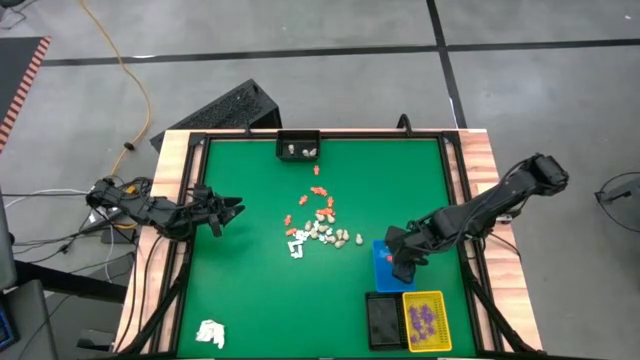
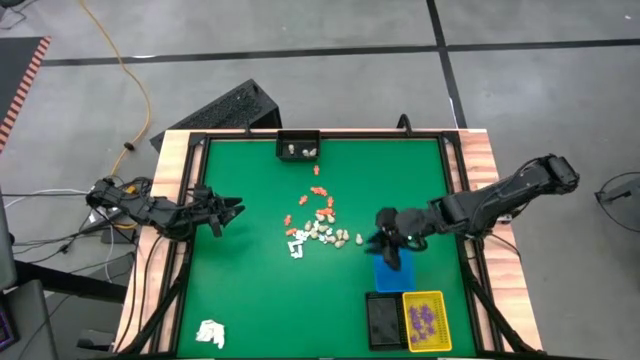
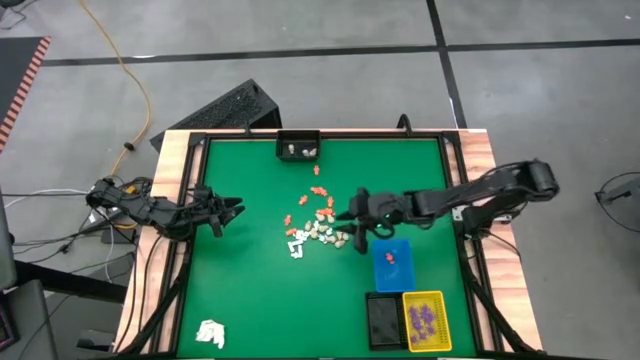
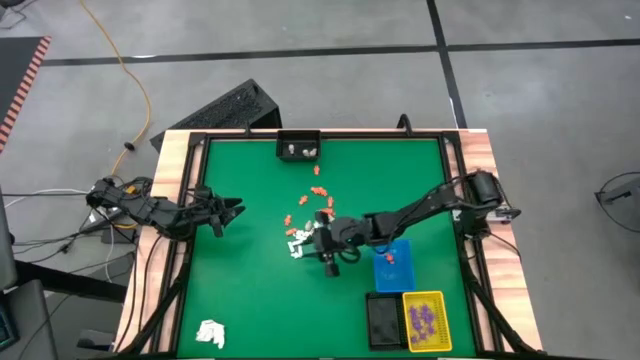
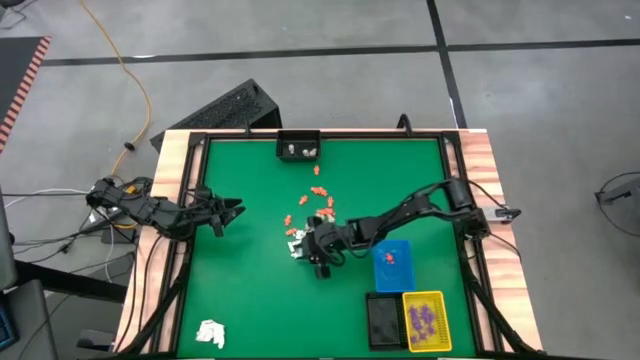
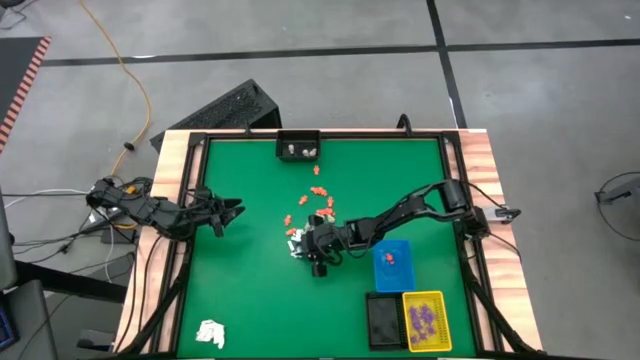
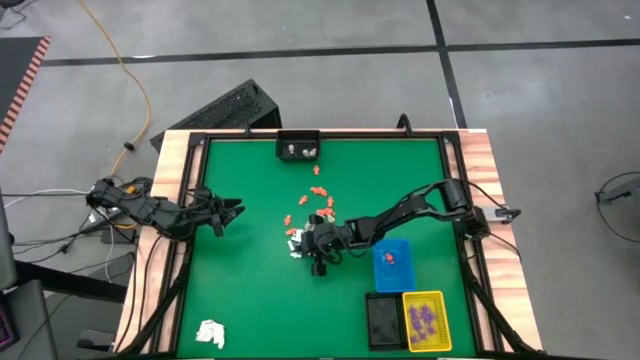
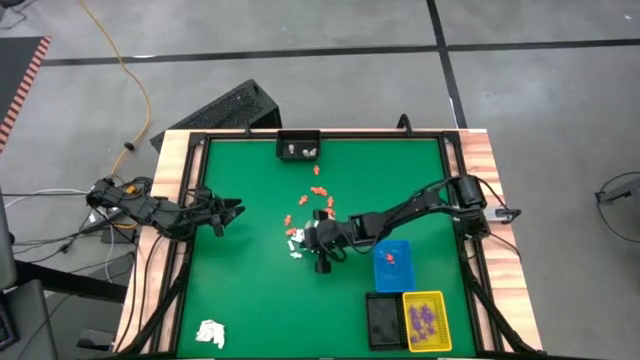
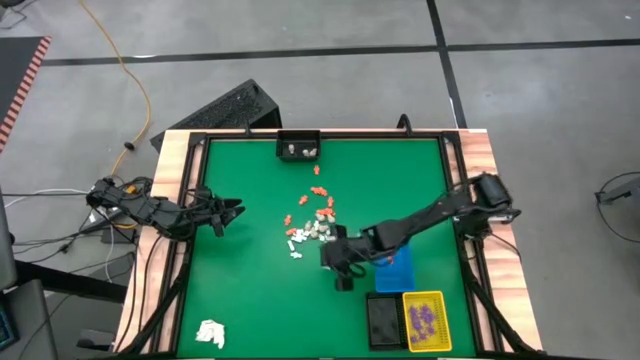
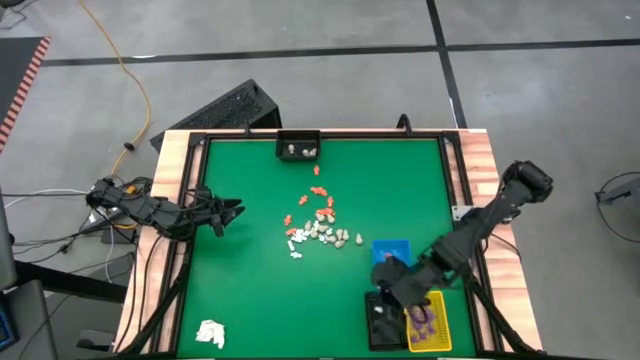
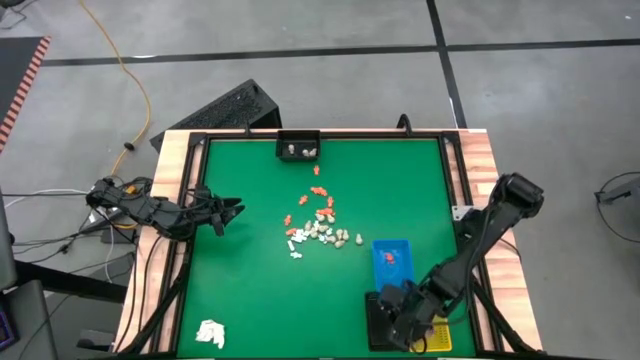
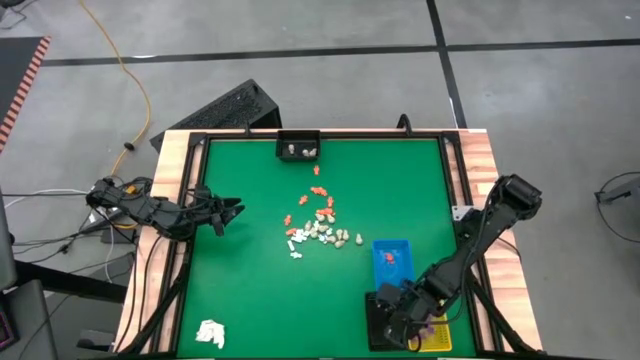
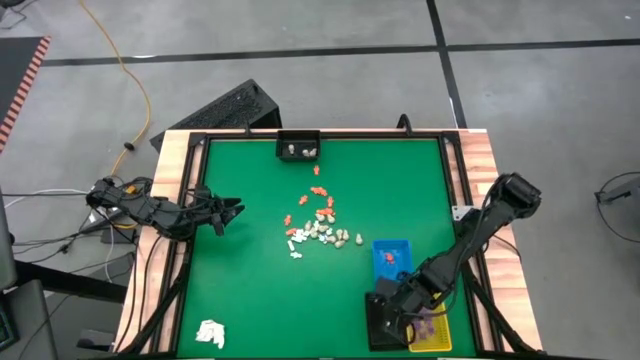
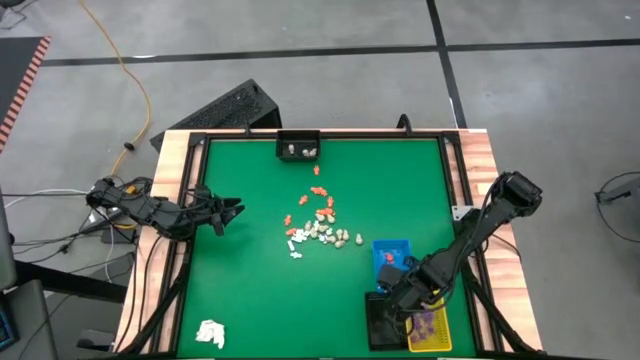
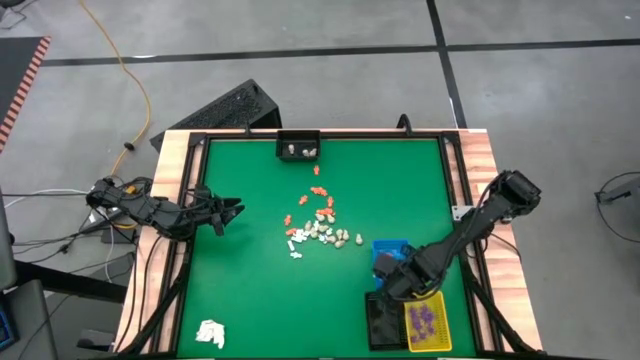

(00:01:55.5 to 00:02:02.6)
Task: Sort Halloween decoration
Put the white skeleton toy into the bottom black bin

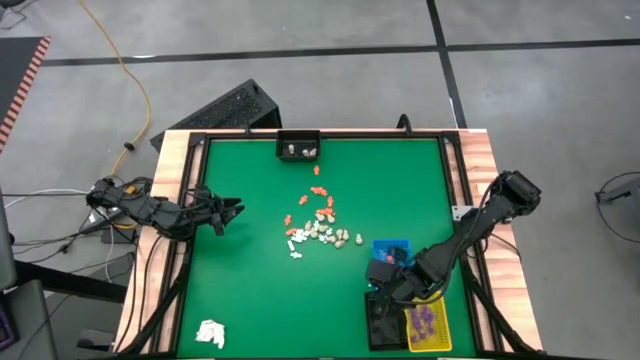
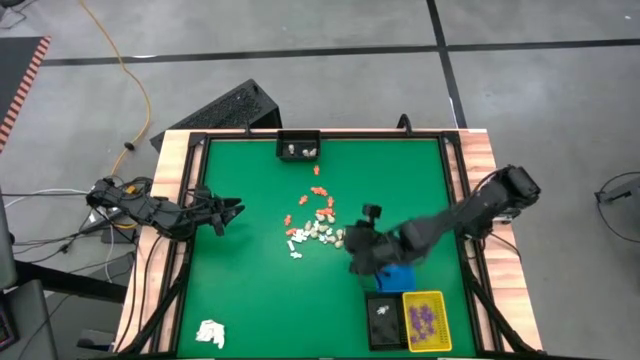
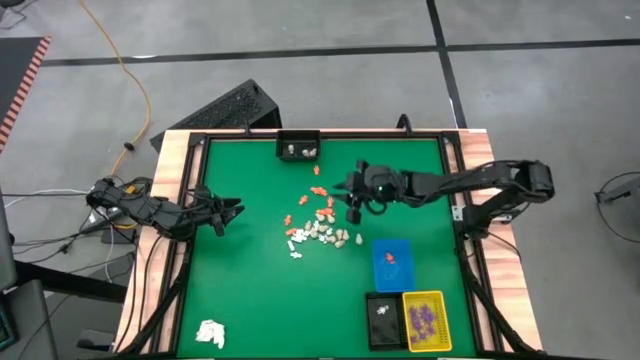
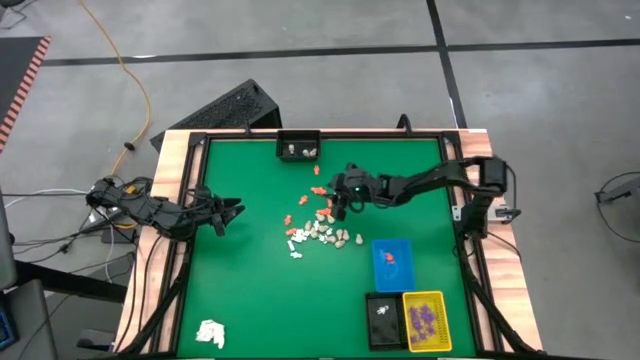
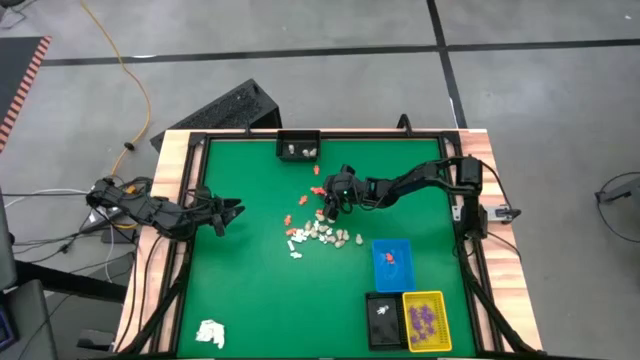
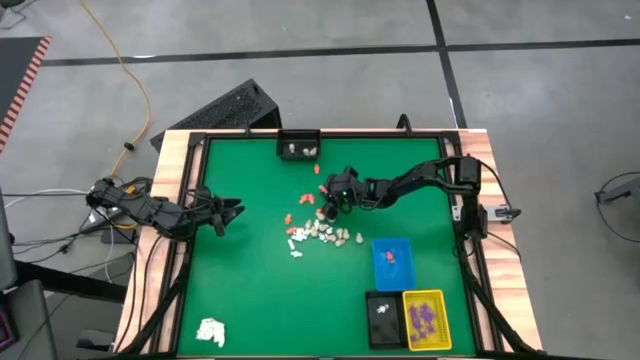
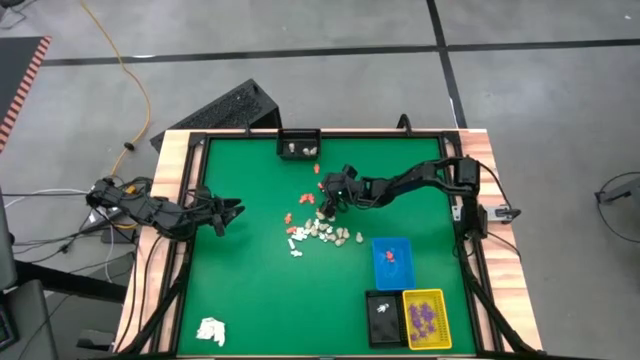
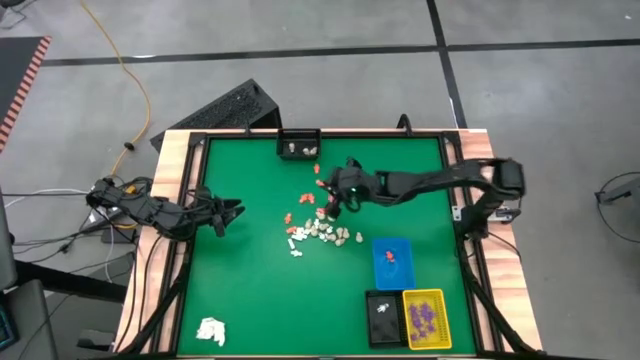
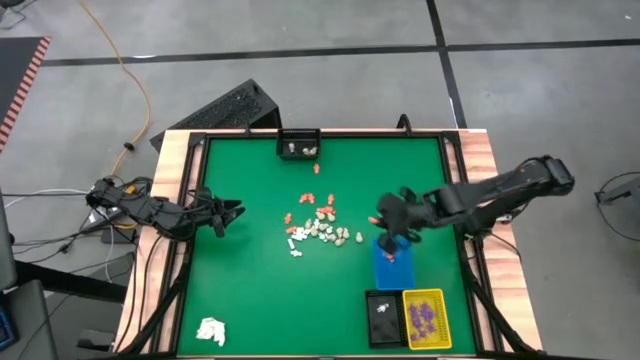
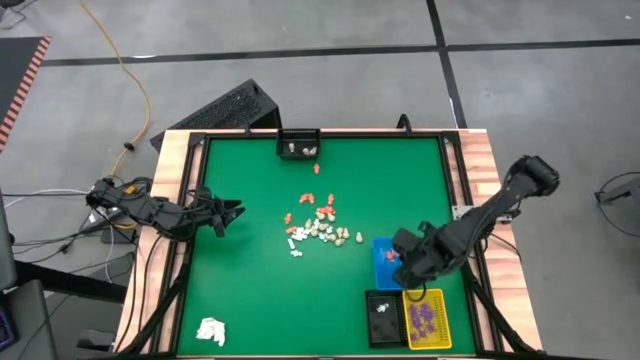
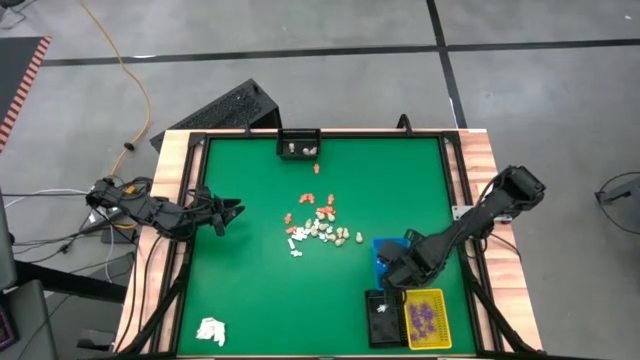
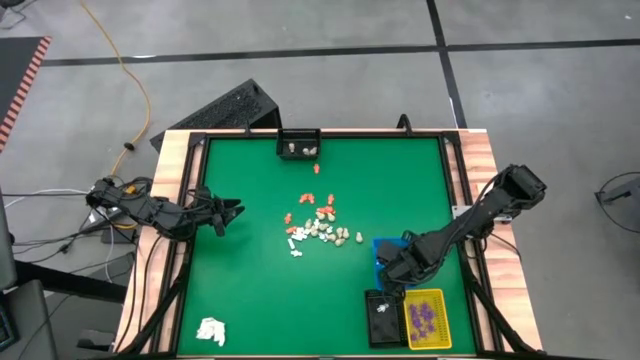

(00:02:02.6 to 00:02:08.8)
Put the orange skeleton toy into the blue bin

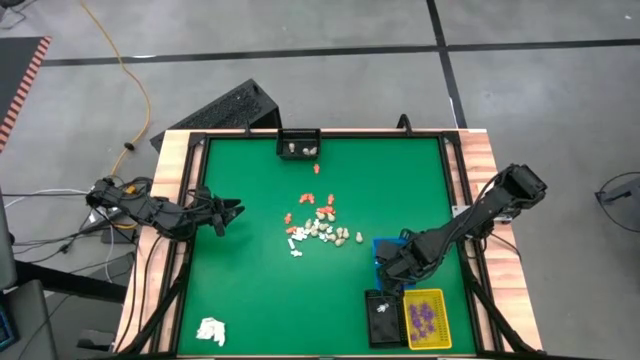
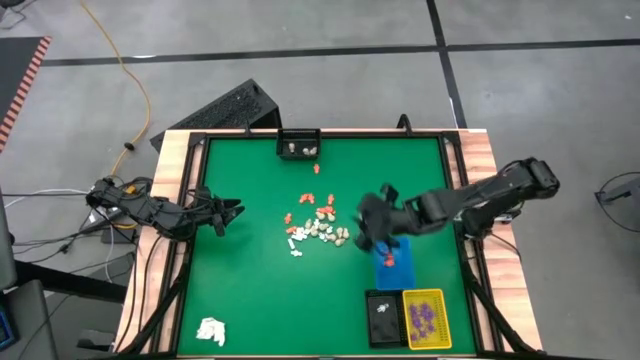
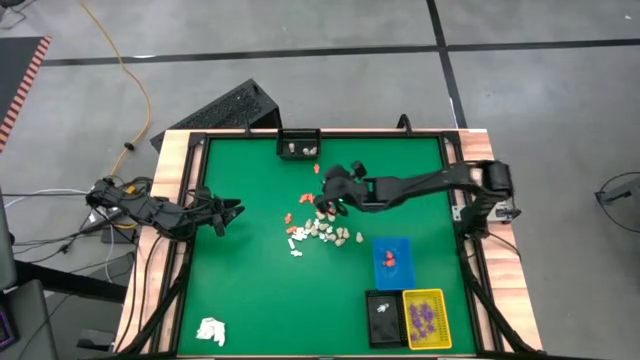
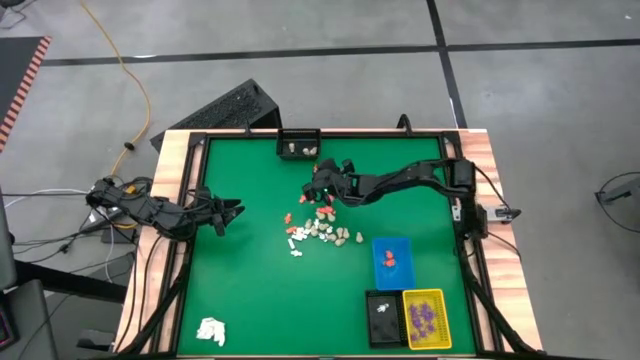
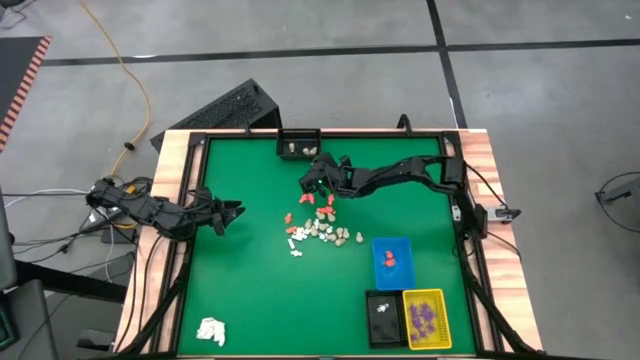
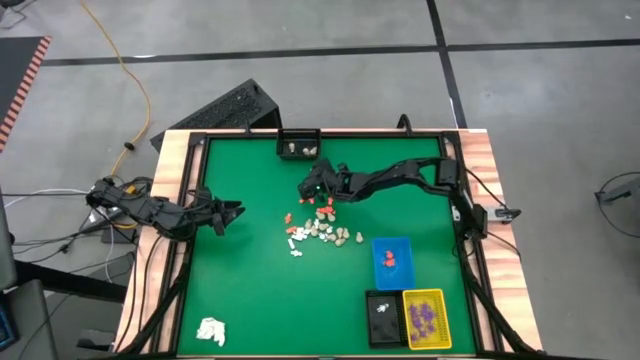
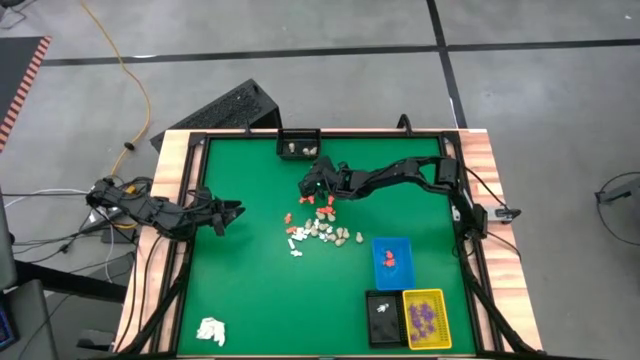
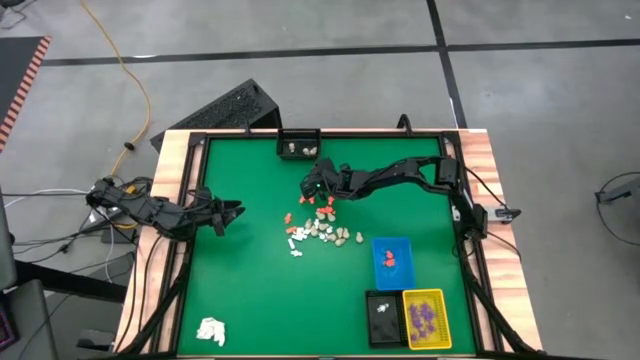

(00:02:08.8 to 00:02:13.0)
Put the orange skeleton toy into the blue bin

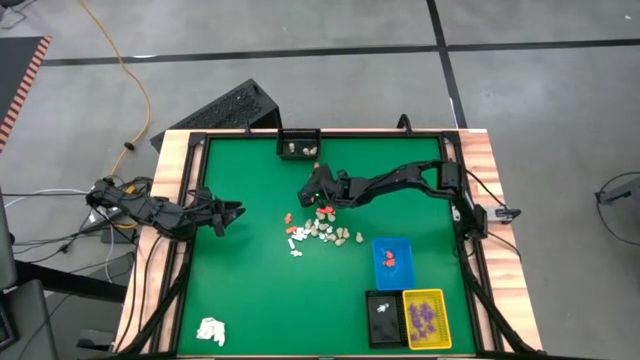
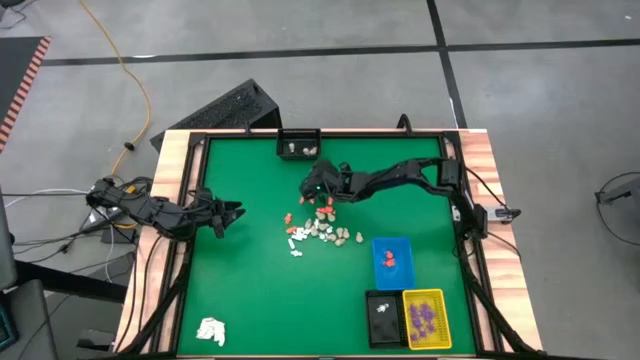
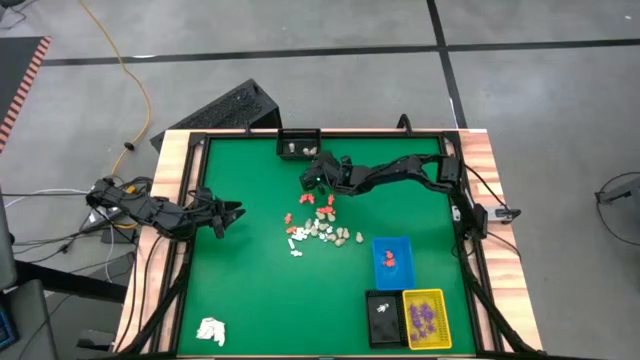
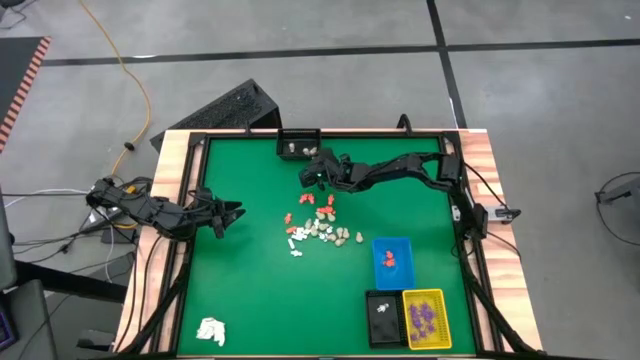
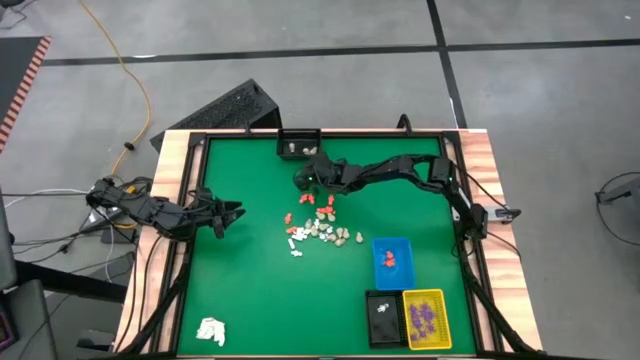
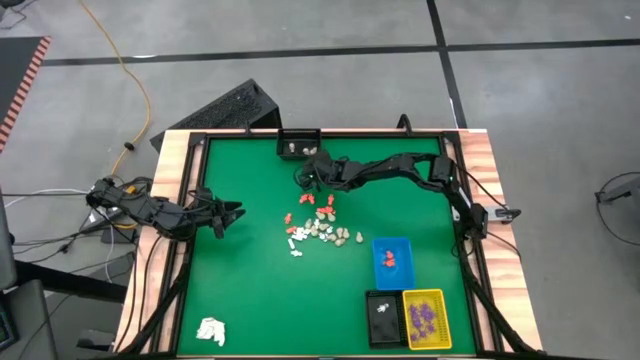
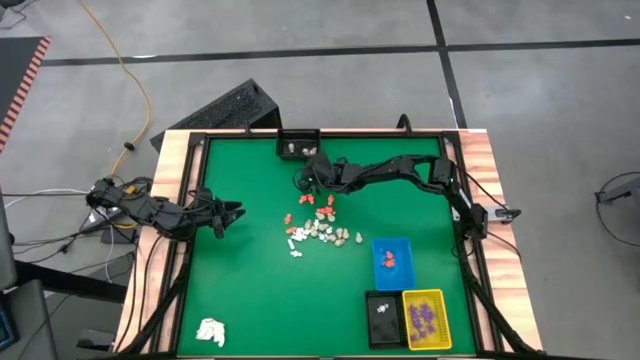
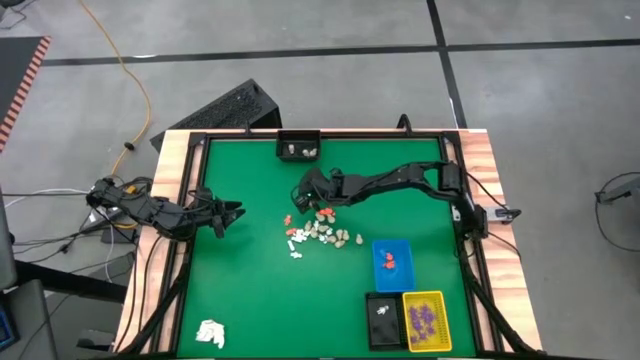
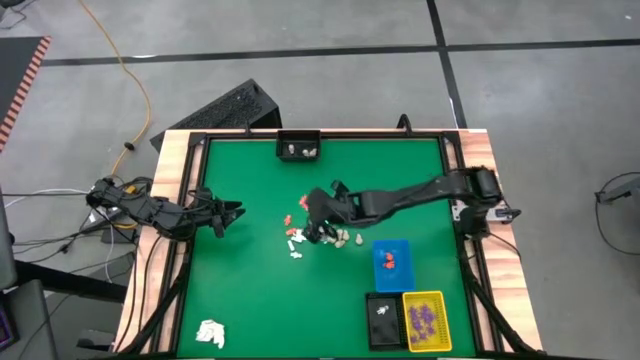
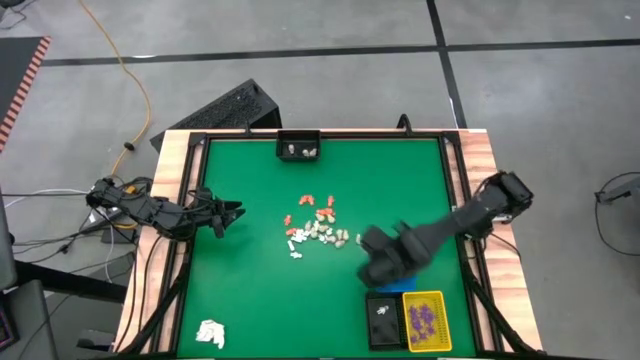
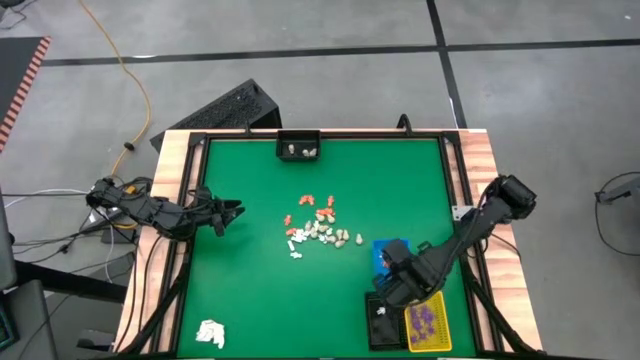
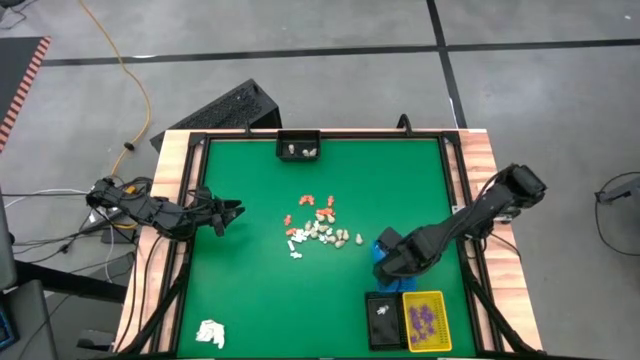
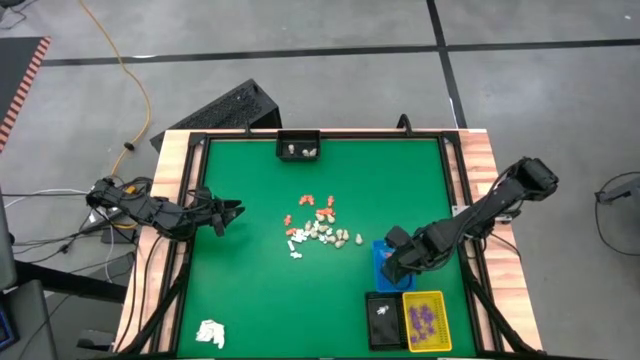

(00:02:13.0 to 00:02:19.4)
Put the orange skeleton toy into the blue bin
